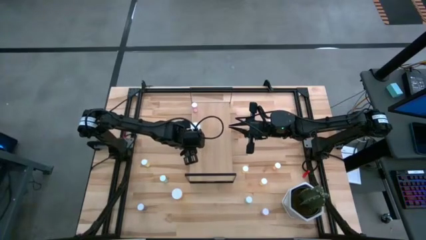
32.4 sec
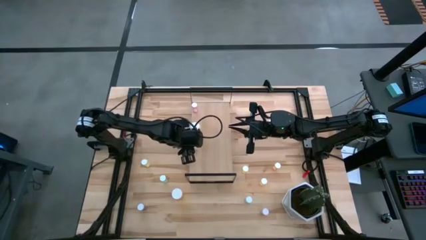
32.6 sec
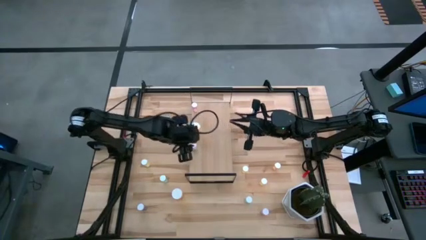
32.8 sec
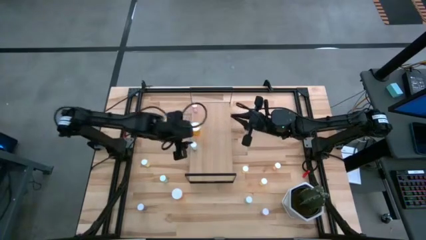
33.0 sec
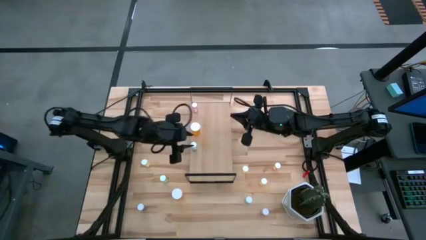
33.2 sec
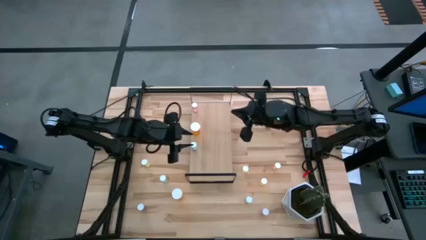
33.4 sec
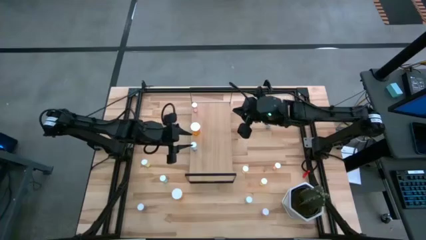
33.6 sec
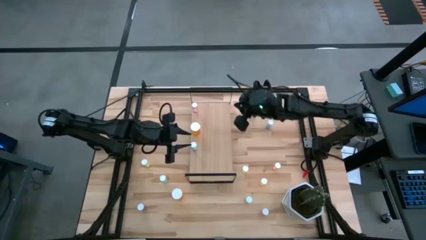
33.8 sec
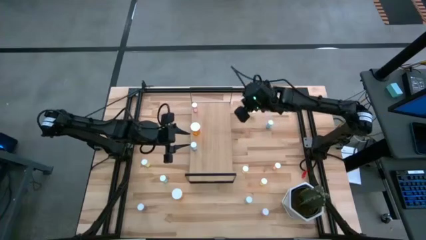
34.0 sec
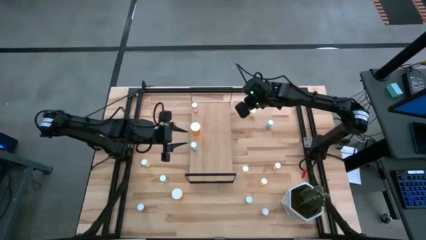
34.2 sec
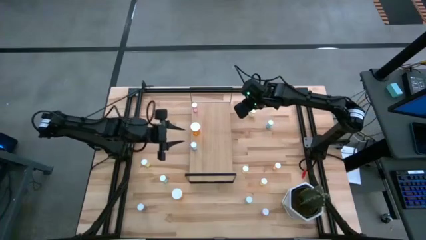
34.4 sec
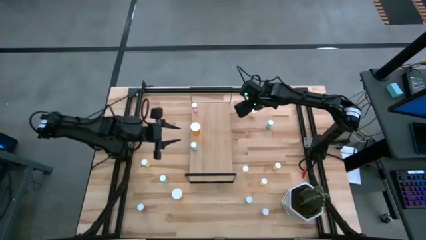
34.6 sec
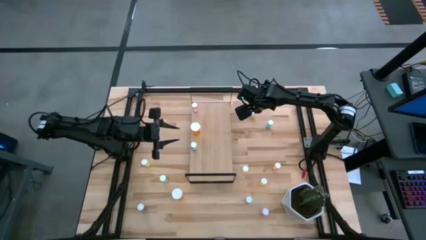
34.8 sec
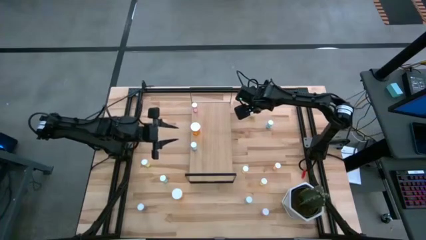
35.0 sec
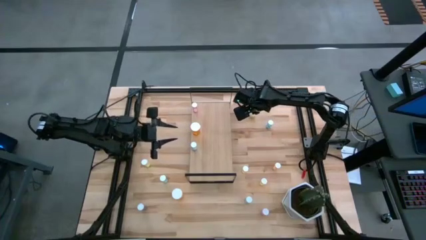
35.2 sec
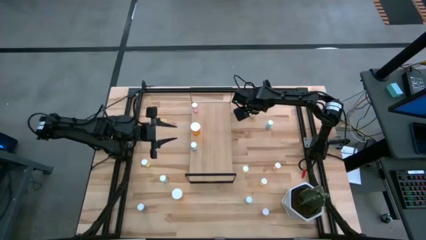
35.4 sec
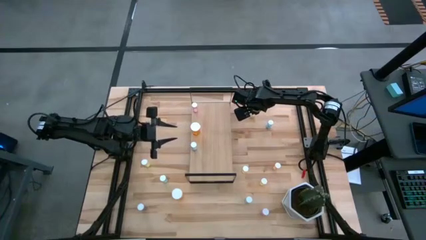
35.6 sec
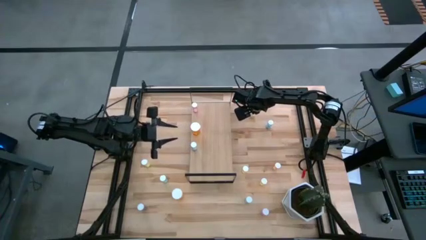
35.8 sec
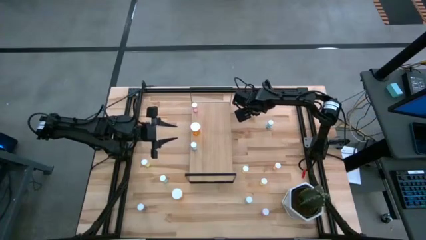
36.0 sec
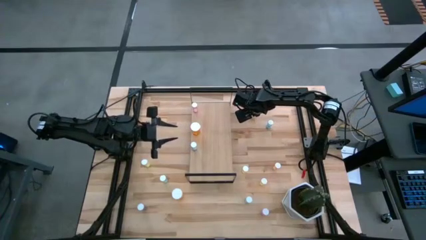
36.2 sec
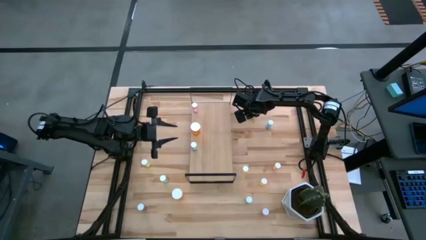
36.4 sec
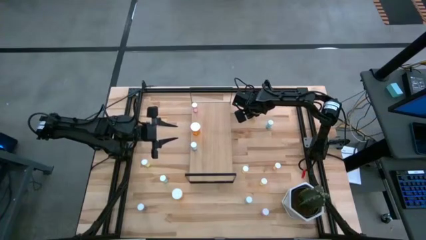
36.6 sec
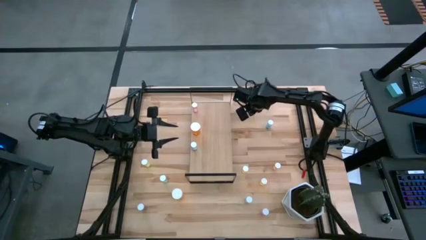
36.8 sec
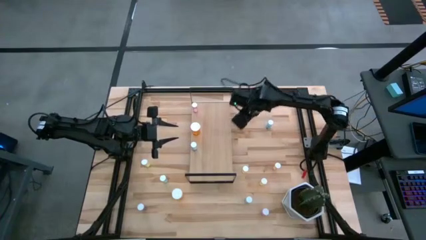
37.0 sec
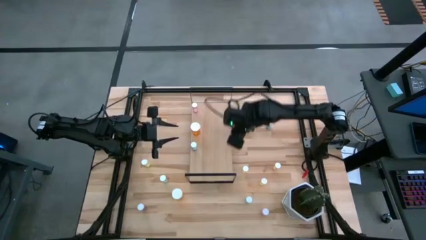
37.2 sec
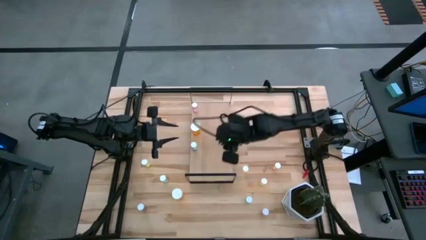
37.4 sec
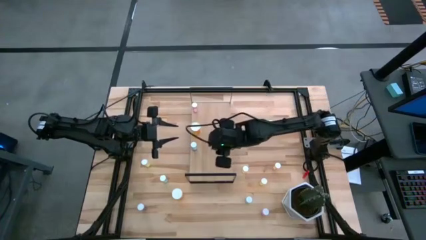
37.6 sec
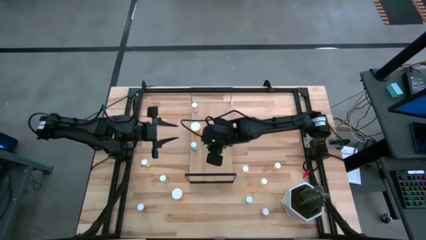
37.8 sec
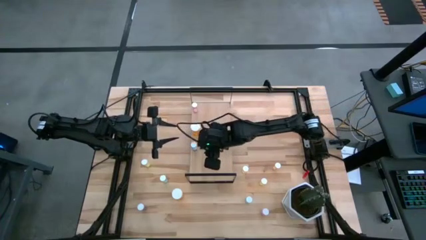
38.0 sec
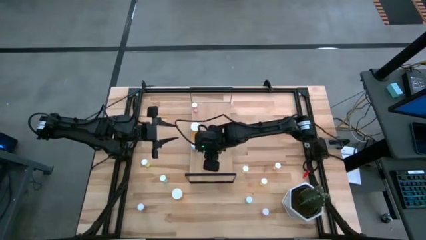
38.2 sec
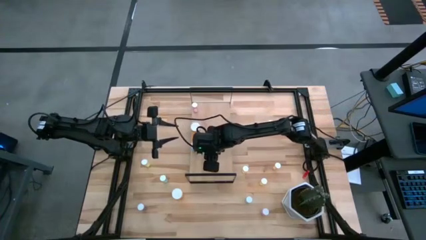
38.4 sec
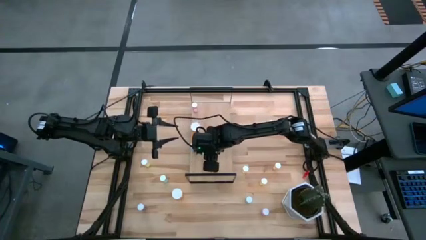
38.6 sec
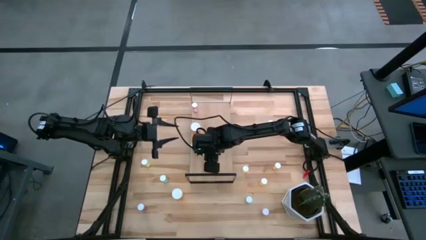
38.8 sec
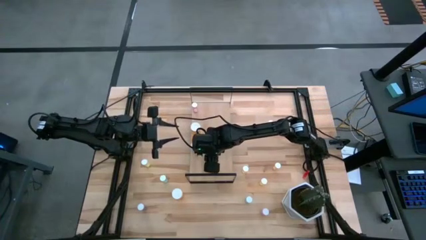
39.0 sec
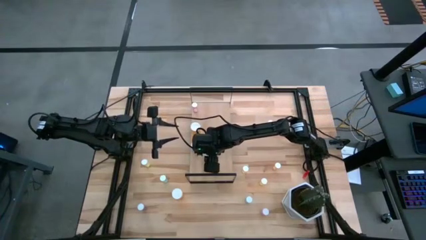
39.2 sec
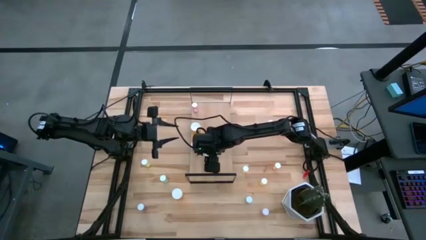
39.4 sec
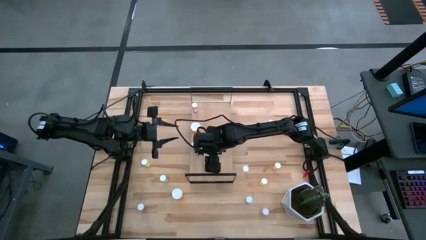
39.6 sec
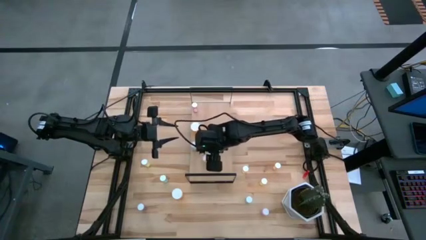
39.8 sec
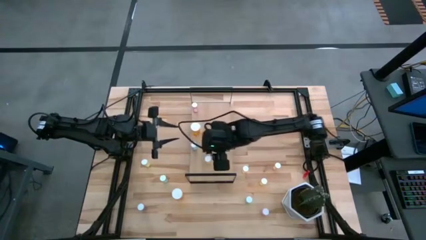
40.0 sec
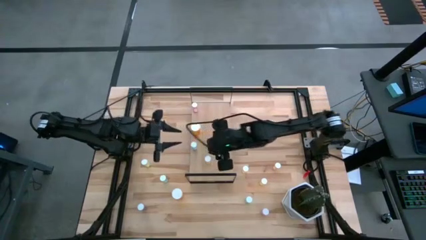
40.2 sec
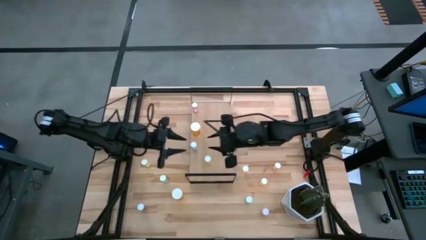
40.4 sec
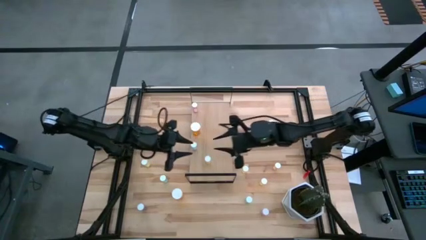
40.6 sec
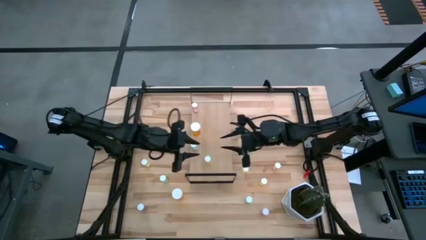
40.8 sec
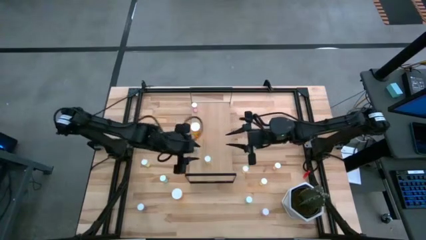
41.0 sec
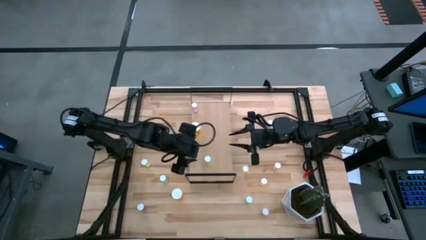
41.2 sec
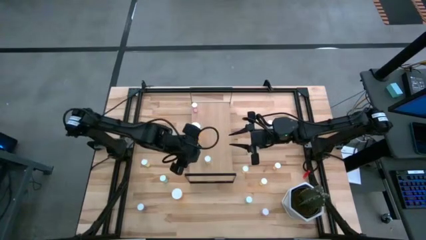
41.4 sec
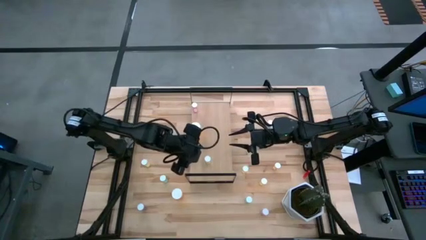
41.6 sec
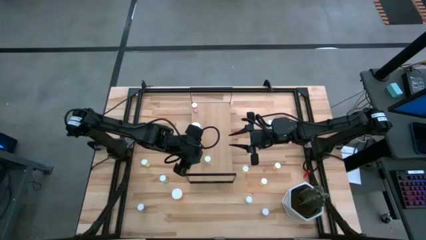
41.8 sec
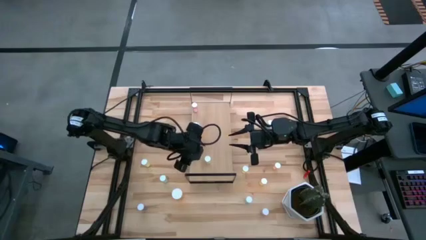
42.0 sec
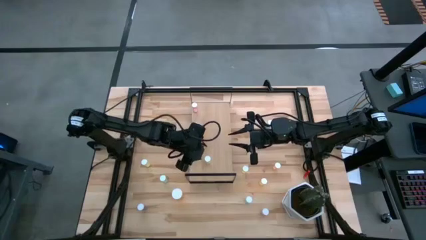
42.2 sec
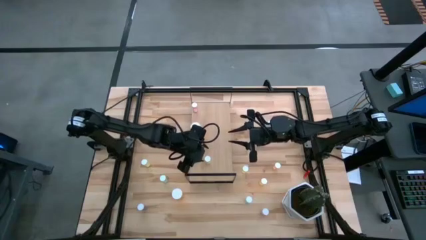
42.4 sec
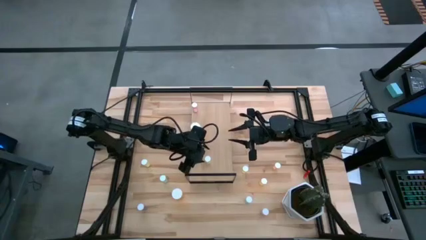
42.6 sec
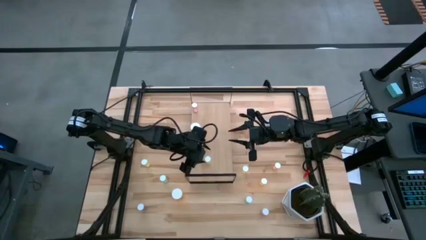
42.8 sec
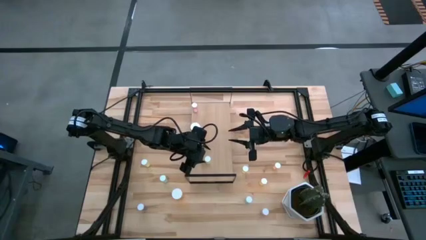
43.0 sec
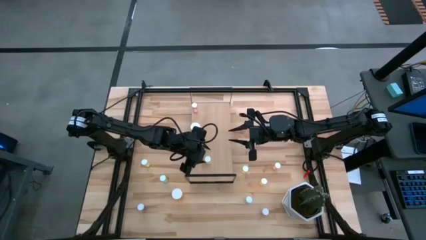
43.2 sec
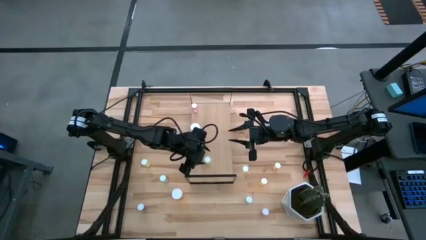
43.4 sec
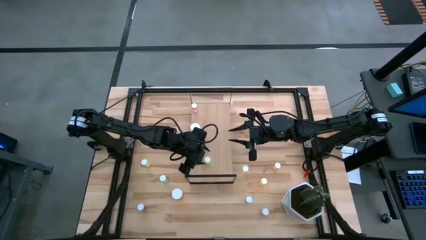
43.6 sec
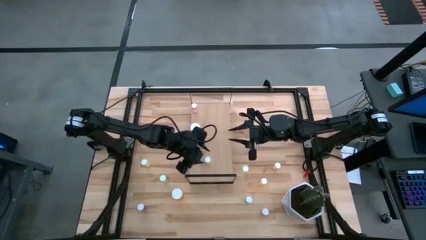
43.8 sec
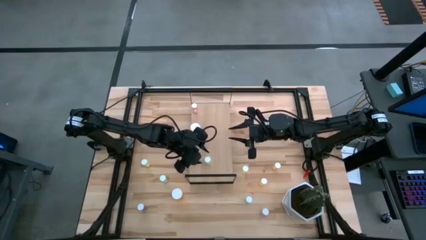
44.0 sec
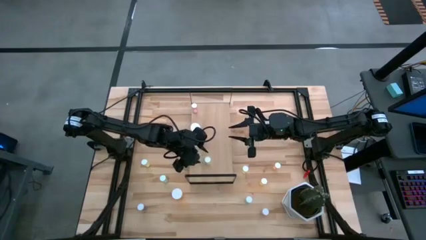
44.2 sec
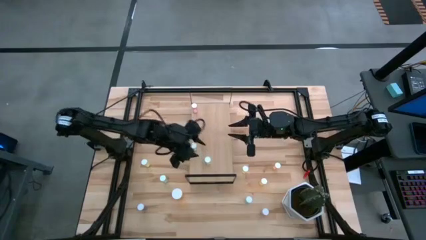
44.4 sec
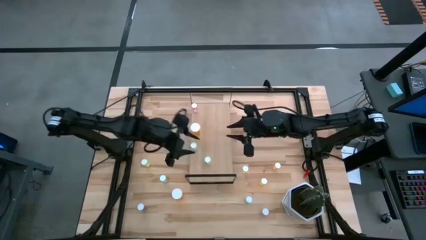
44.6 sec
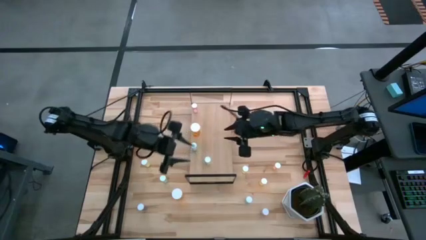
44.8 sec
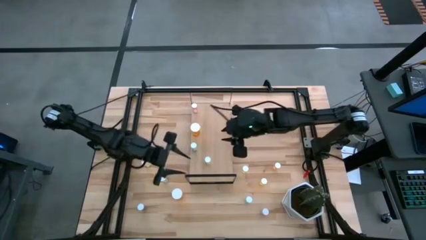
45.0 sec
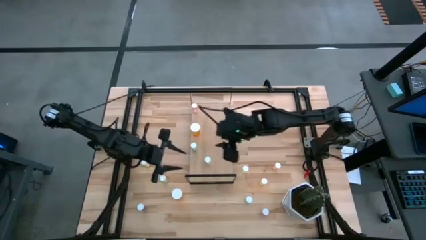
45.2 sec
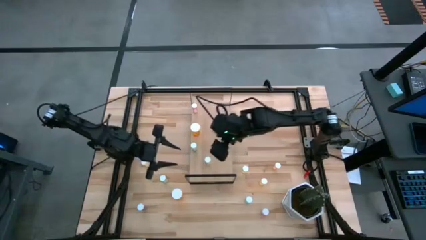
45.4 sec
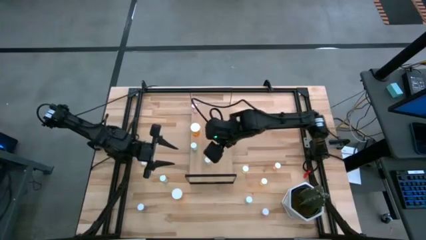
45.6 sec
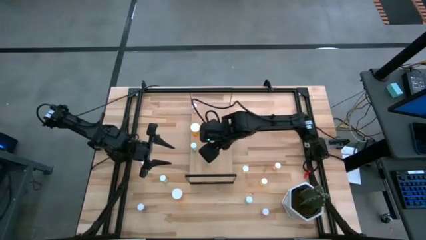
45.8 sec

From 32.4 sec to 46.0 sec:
Task: Pick and place medicine bottles onto shelf by color
Put the yellow pill bottle on the shelf

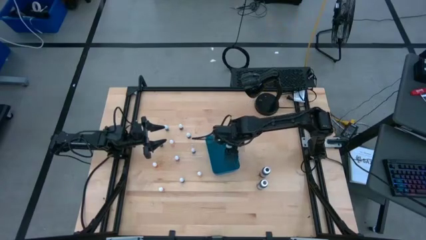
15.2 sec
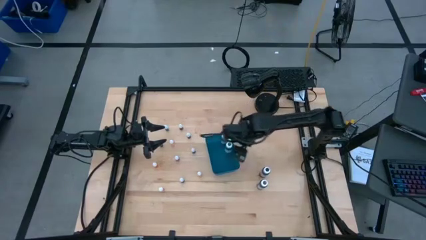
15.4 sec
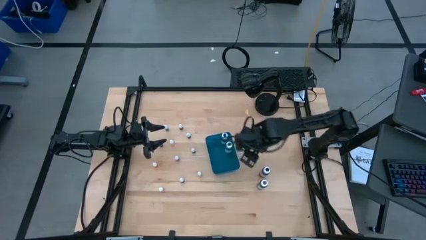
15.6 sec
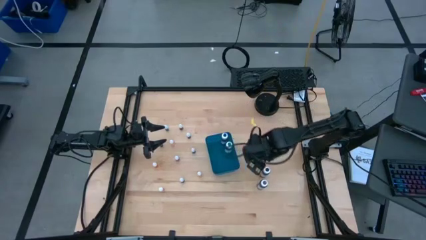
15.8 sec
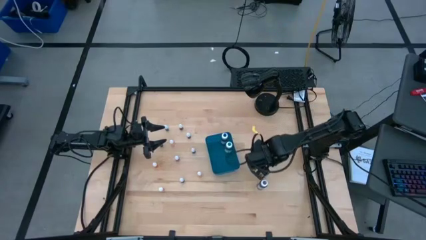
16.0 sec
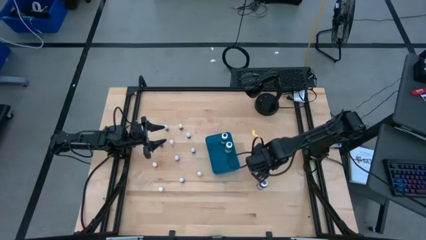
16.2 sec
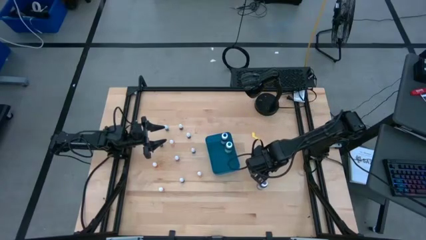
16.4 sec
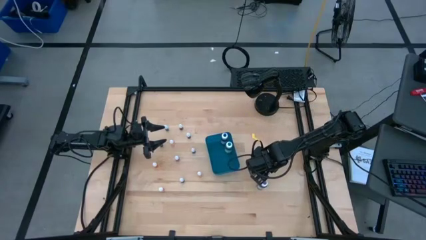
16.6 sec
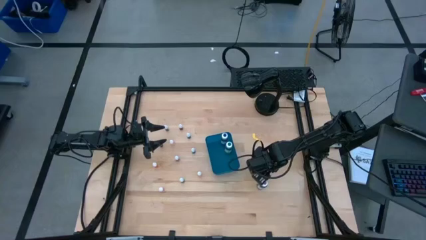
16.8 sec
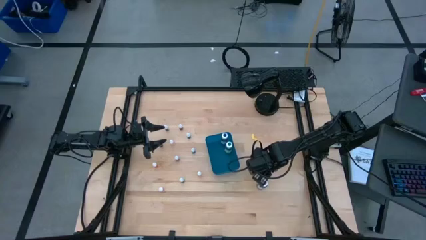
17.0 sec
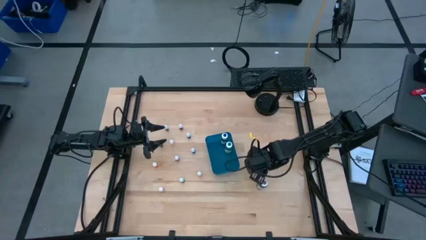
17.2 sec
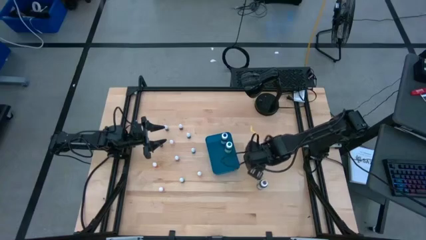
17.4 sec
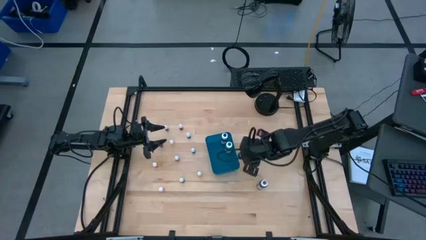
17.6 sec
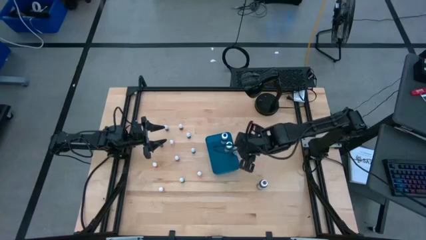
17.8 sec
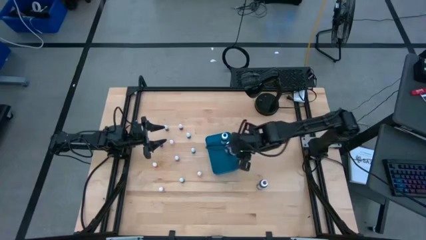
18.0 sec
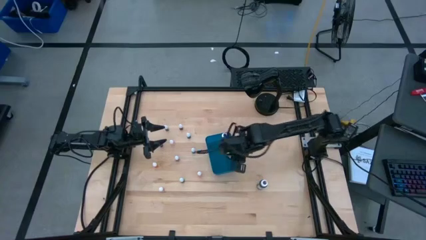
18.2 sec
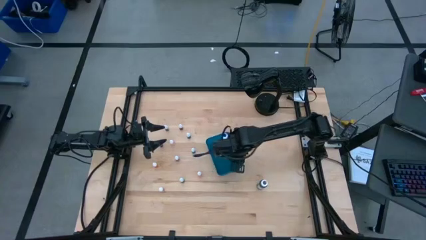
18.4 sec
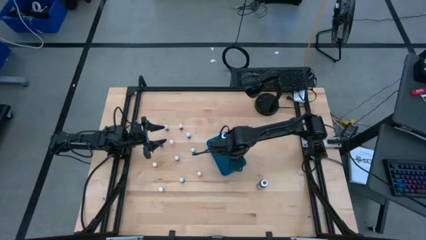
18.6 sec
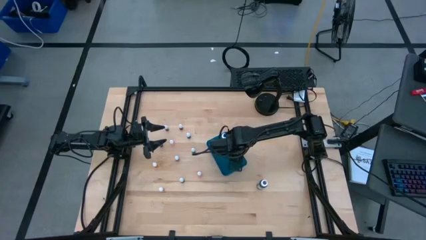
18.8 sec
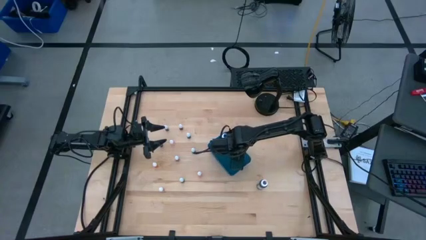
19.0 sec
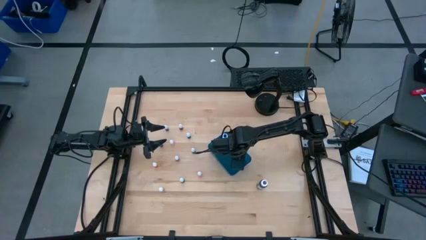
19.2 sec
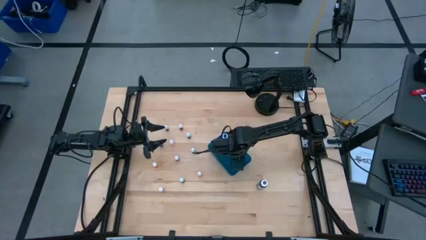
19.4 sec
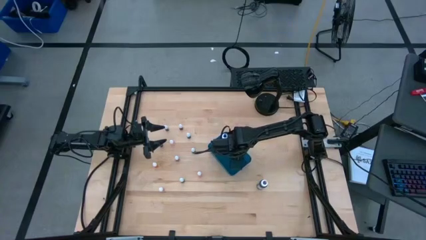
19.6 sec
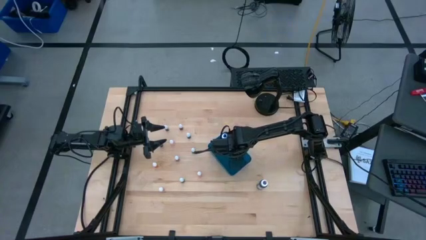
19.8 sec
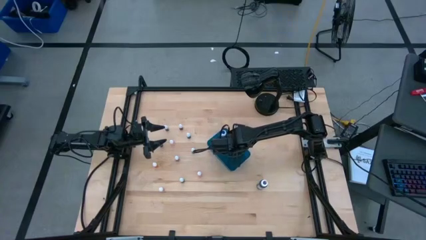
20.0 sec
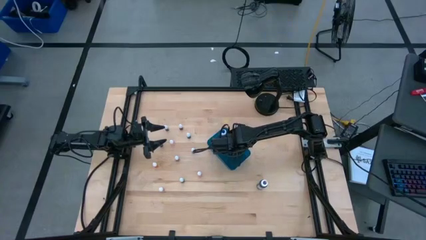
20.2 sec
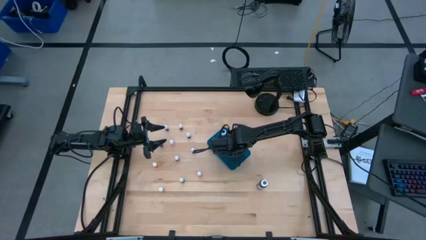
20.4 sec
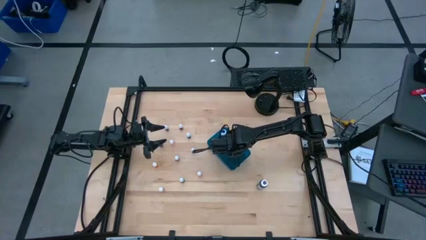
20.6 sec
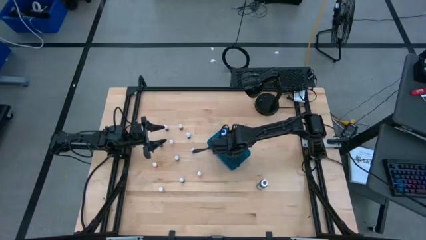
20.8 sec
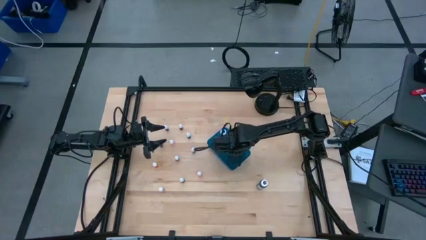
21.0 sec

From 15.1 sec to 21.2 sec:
Task: Pick & Place food coloring
Put the large black food coloring bottle into the blue container
